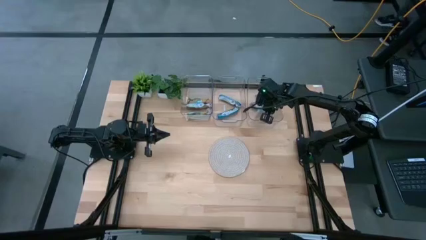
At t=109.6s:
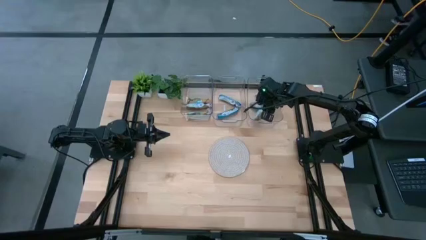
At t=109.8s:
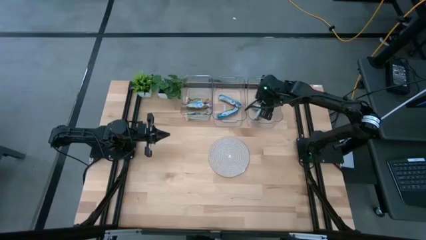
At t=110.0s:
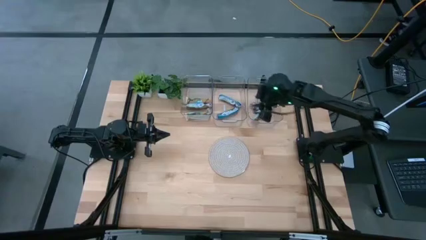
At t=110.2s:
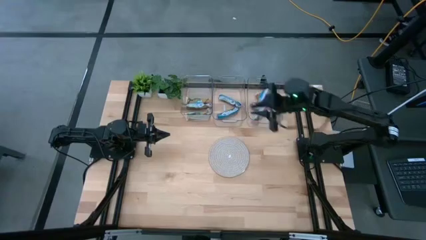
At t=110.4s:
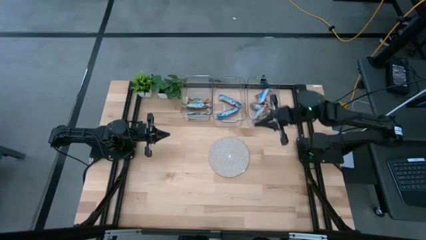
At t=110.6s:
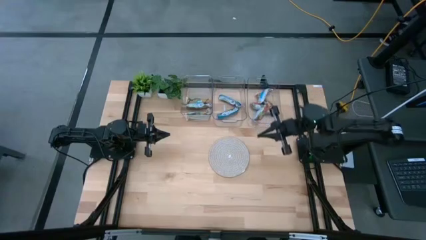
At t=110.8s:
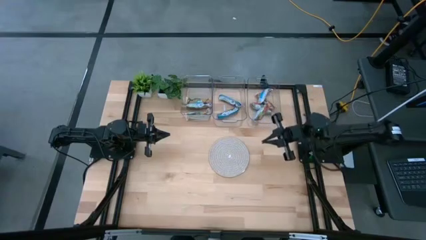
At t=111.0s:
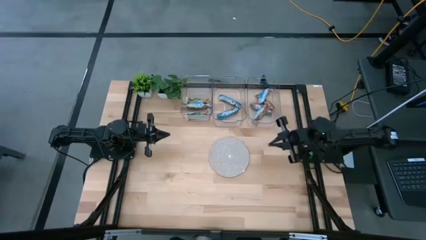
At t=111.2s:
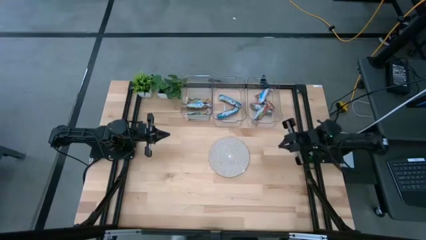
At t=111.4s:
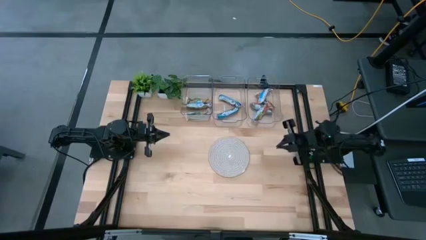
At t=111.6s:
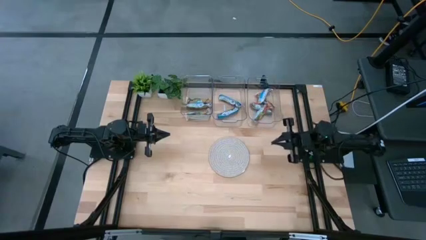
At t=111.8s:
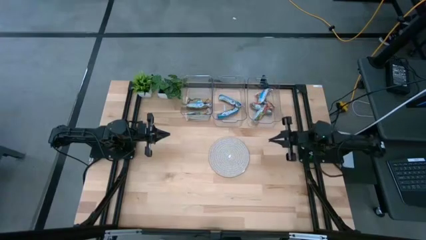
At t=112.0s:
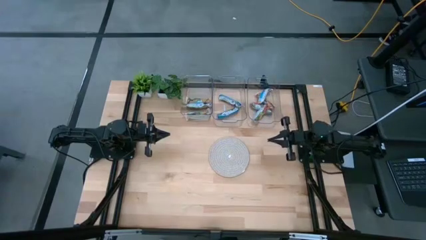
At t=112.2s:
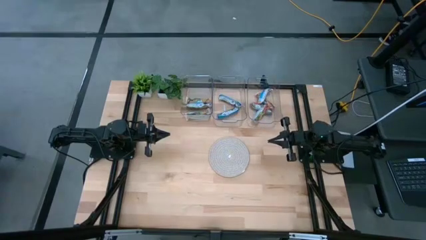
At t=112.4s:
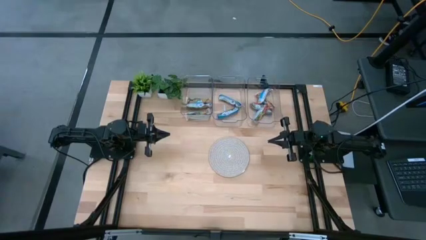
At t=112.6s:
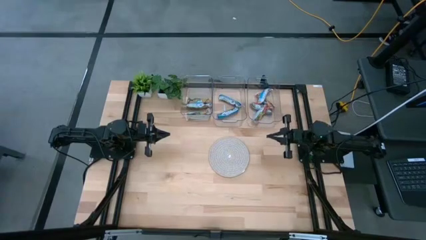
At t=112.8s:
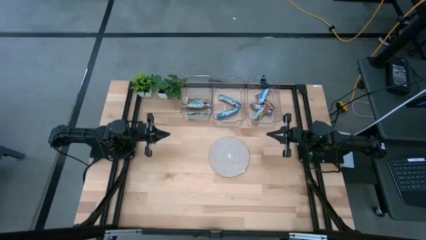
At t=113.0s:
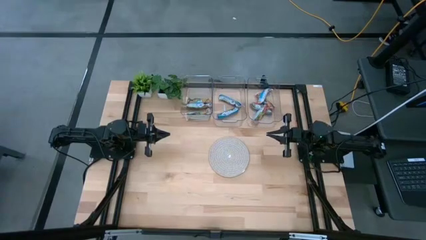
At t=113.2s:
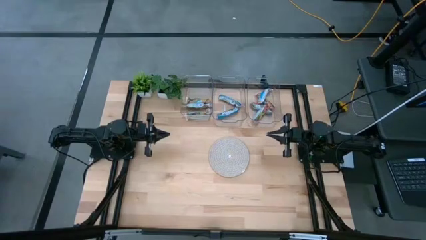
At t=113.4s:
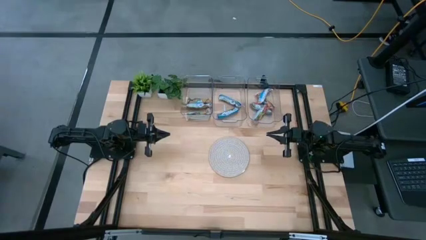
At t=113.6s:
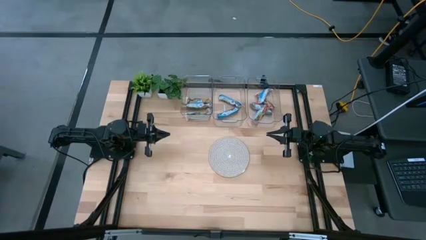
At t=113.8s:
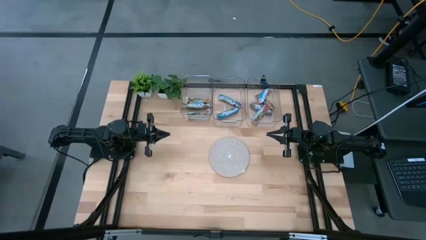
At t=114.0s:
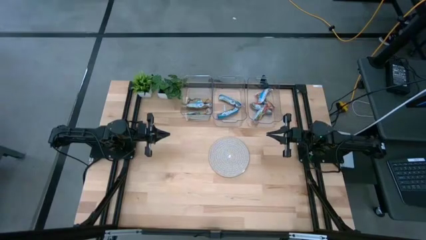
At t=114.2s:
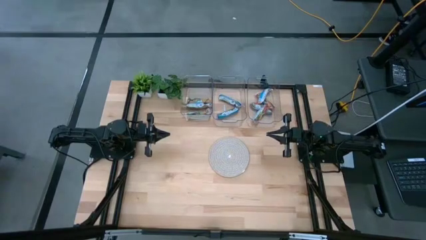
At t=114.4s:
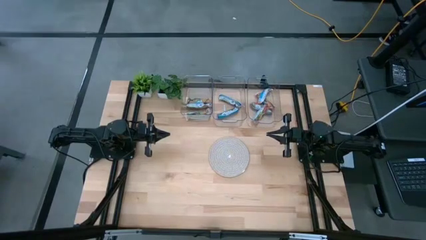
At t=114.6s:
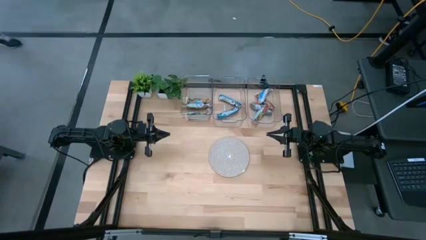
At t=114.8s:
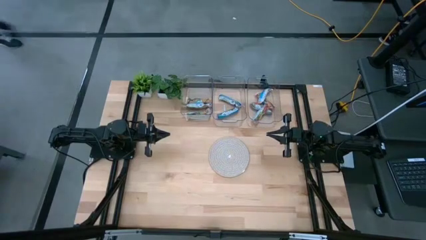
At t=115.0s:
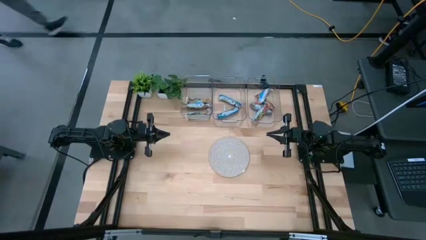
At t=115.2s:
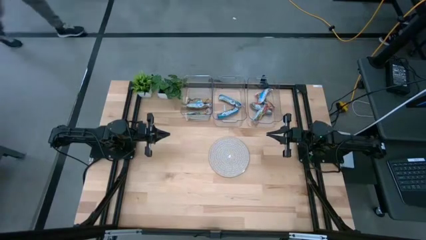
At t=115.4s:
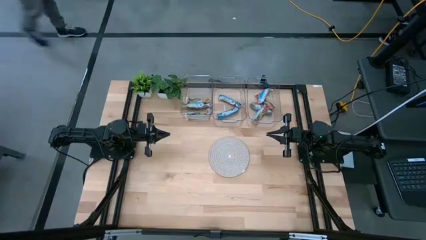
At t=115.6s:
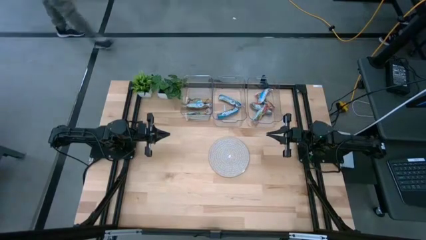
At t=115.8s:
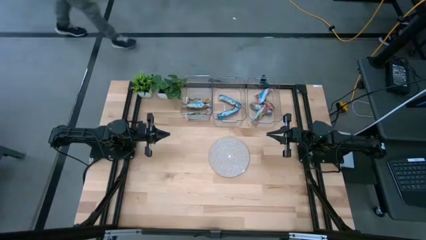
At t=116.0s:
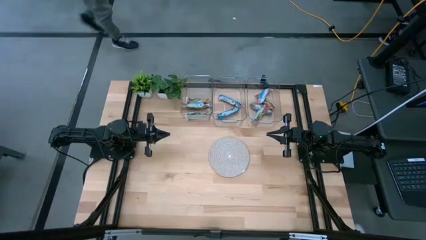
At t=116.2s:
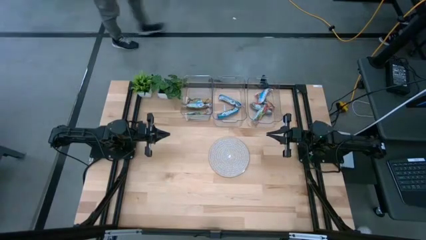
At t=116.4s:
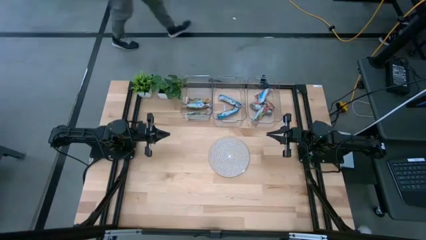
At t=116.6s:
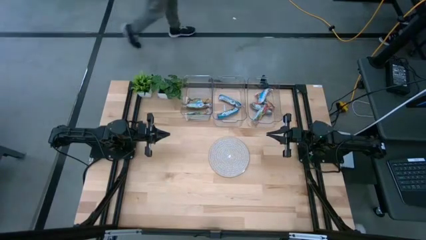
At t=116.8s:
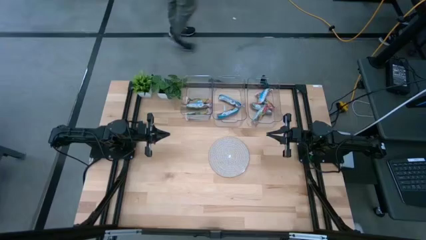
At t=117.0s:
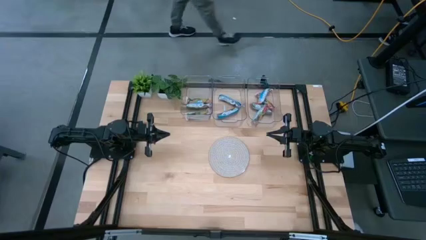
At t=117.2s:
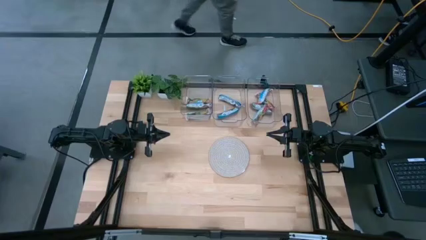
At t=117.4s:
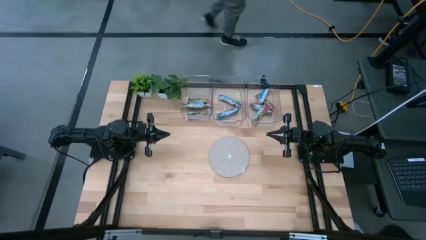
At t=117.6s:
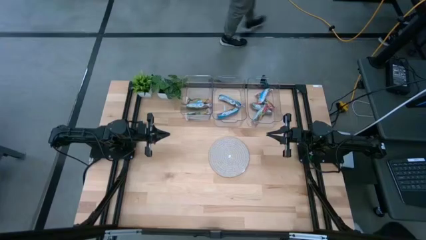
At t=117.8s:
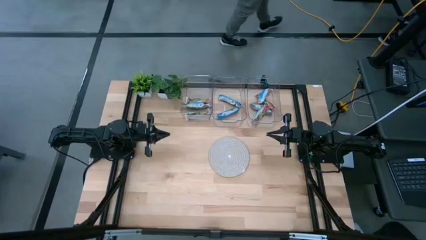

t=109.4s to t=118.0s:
Task: Pick and place Granola Bars by type
Return to Home Position

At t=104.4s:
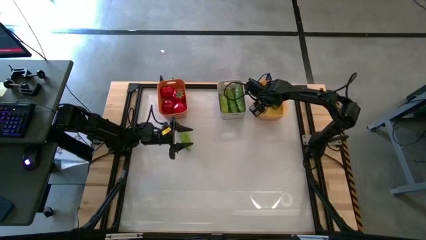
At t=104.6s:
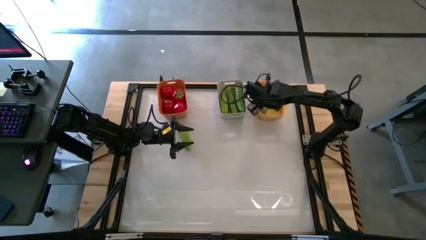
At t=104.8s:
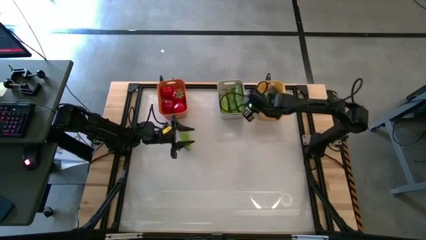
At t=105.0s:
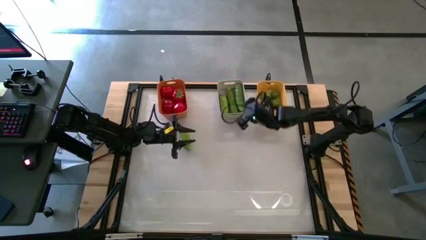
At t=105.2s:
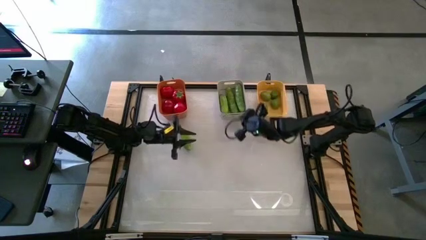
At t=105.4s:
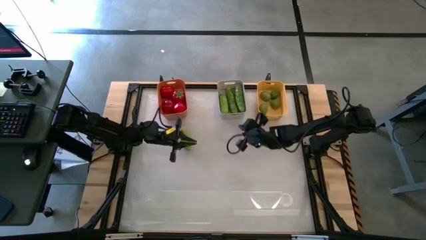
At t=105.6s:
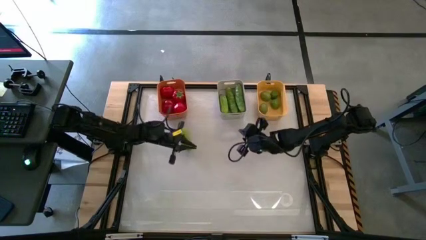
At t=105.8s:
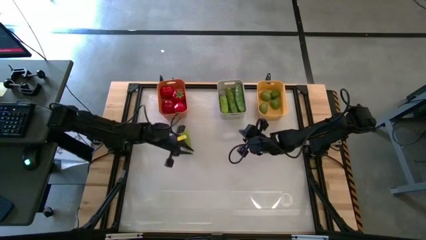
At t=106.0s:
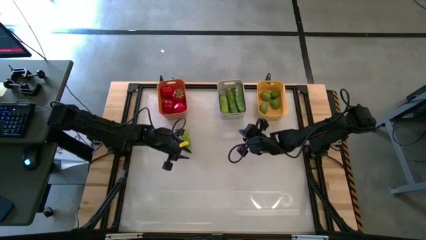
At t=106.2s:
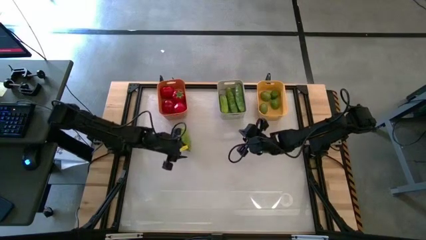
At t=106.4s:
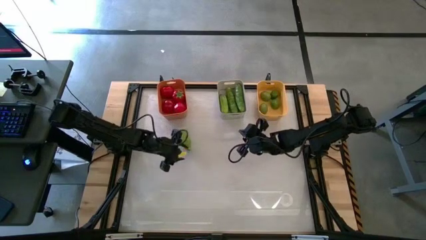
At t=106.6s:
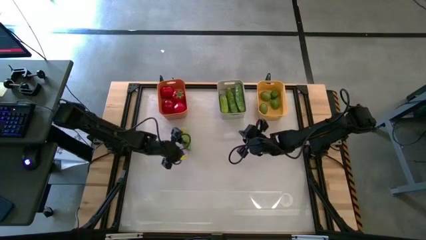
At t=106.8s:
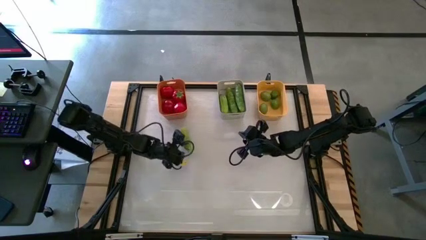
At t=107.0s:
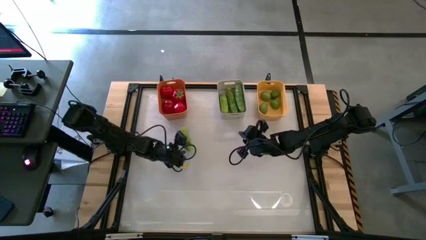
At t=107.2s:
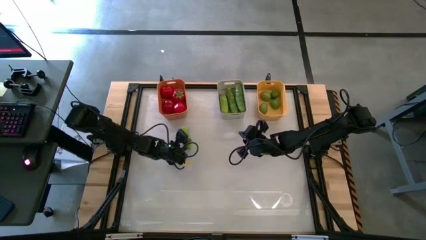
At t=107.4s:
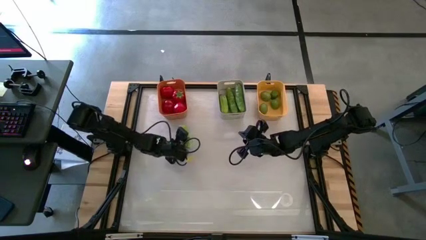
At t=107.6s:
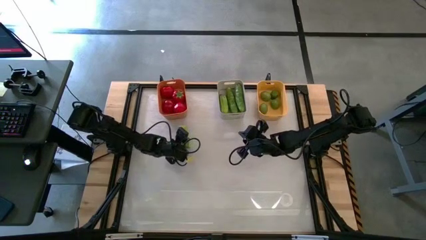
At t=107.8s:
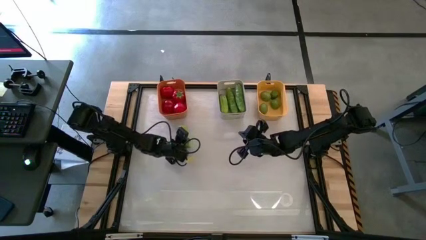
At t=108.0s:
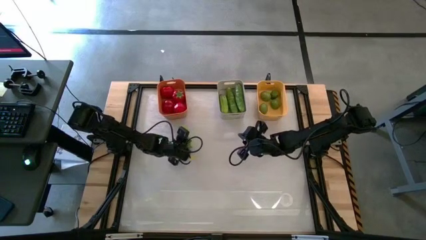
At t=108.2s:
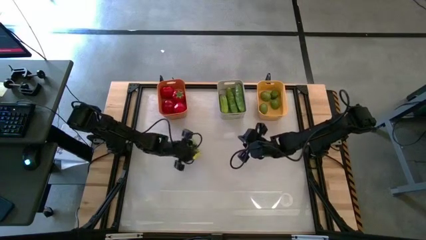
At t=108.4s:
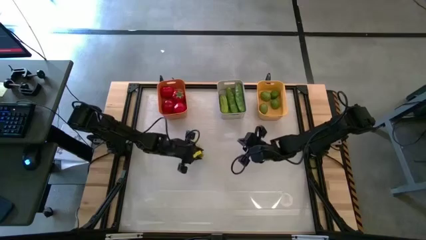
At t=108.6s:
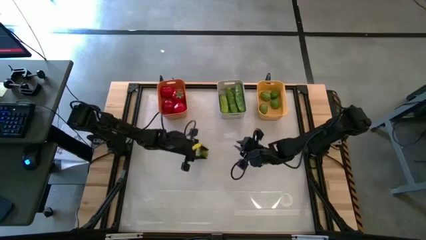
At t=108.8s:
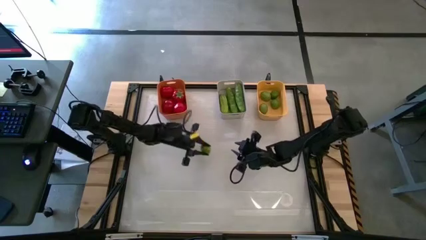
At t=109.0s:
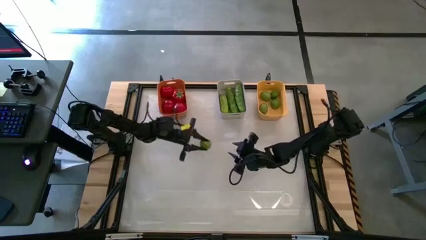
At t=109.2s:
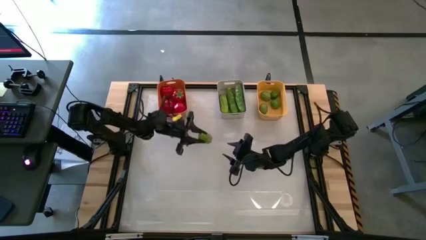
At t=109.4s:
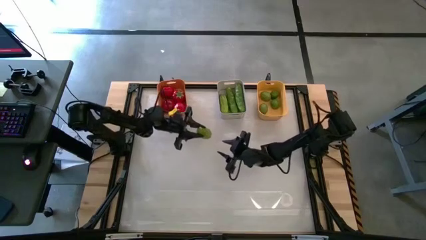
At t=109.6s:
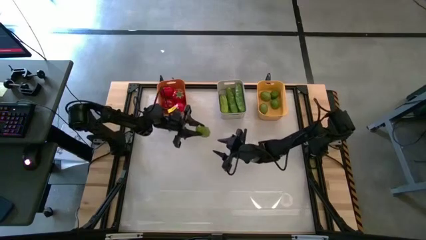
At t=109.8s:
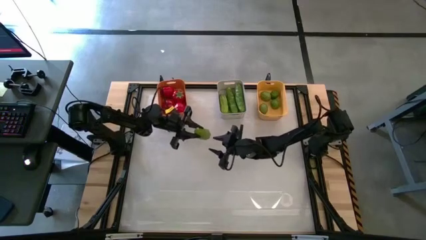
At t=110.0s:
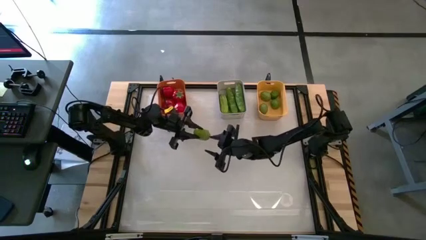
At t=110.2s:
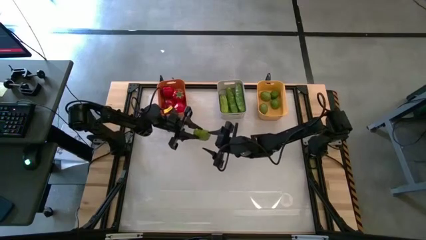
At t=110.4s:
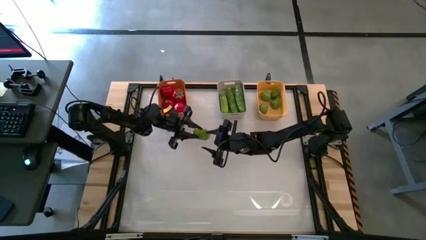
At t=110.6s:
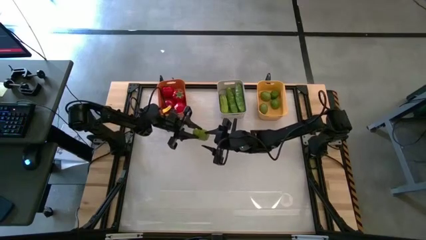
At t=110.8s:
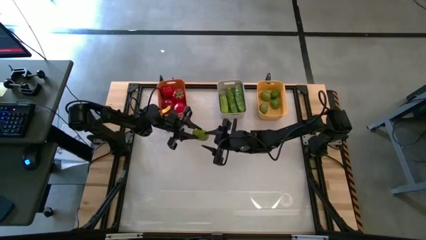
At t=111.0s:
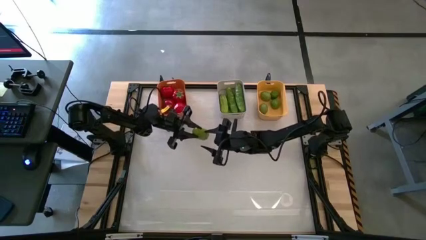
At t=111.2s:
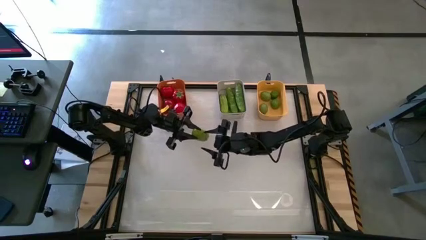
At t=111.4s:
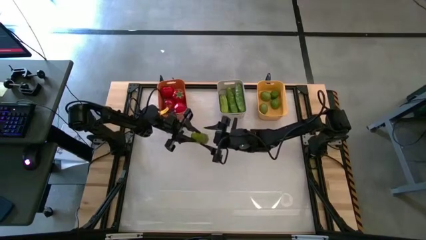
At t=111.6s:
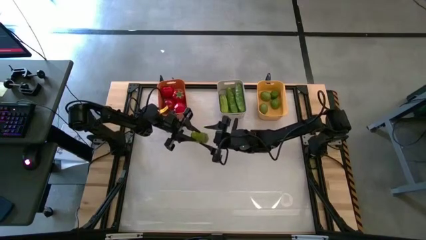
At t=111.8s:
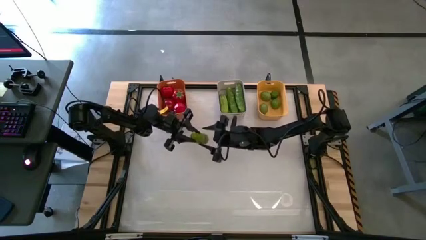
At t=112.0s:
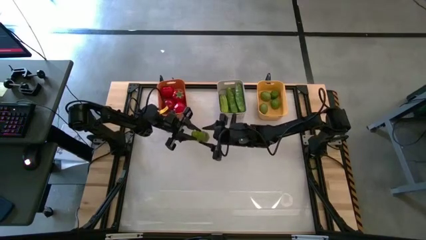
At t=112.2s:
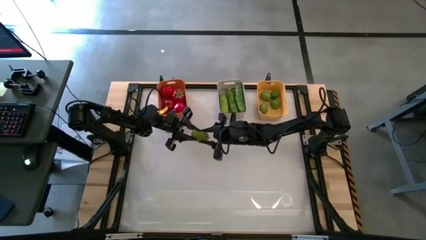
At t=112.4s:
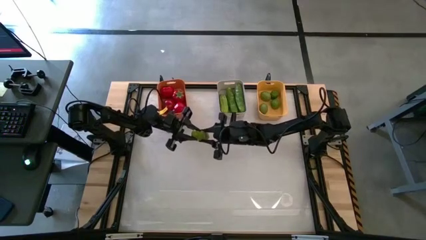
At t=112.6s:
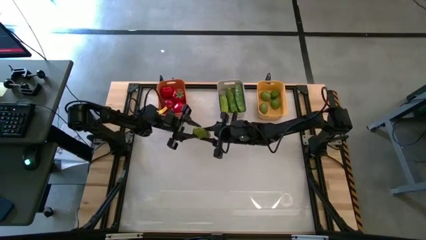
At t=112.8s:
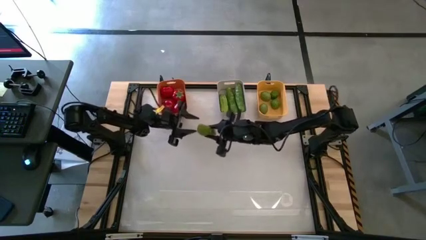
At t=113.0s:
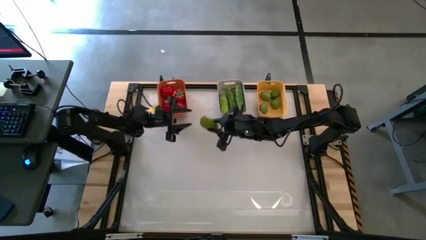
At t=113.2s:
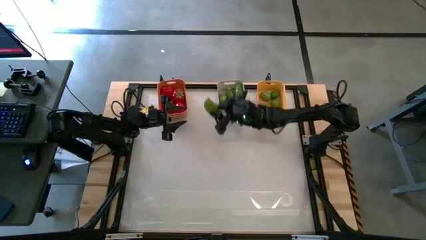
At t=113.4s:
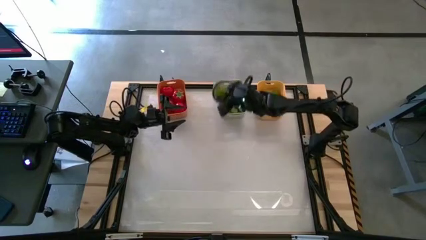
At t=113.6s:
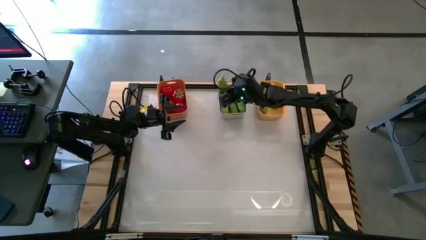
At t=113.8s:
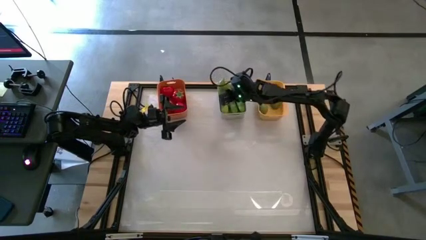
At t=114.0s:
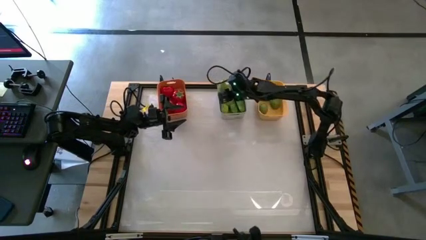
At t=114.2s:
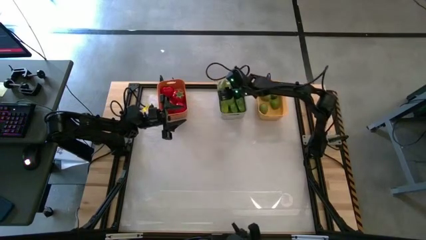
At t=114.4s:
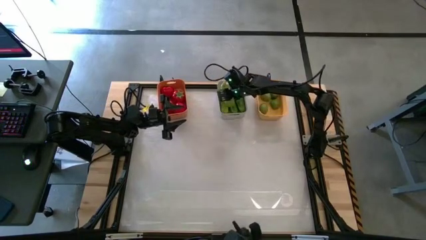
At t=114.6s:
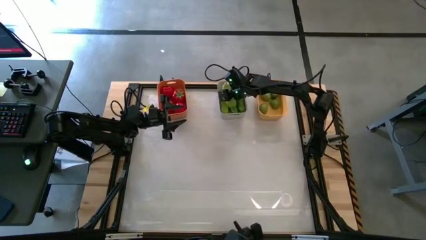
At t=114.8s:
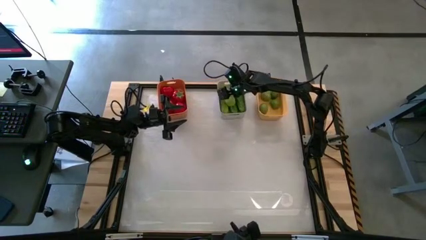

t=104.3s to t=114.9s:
Task: Sort produce into baskets
Put the cucumber into the gray bin
